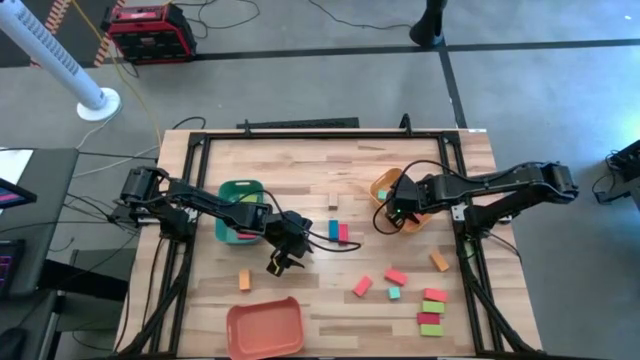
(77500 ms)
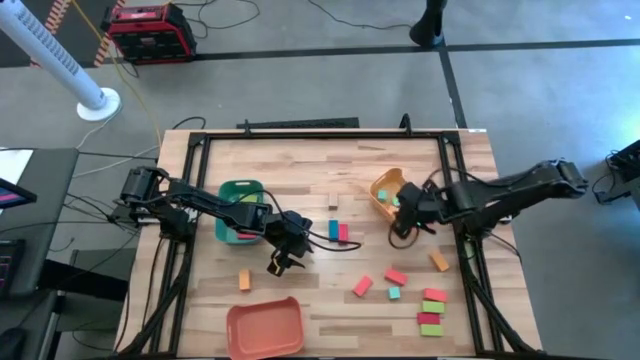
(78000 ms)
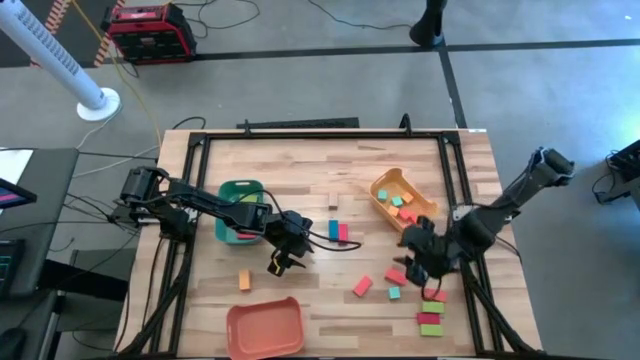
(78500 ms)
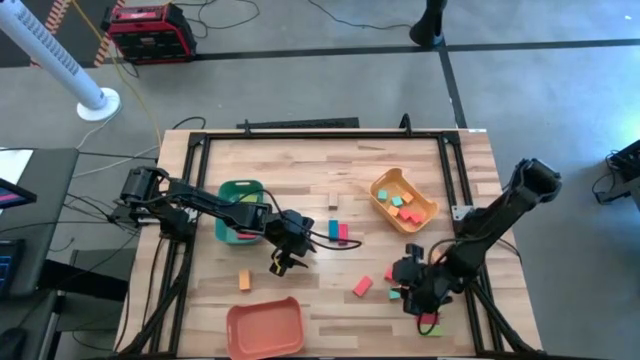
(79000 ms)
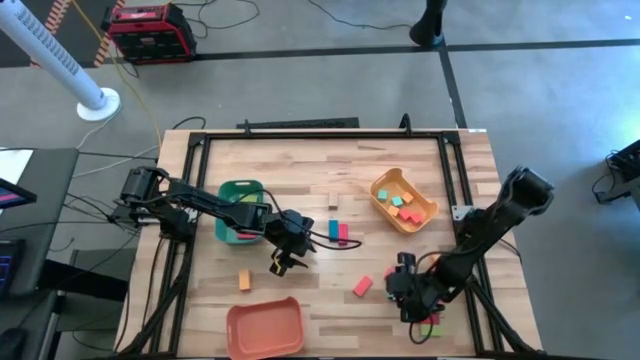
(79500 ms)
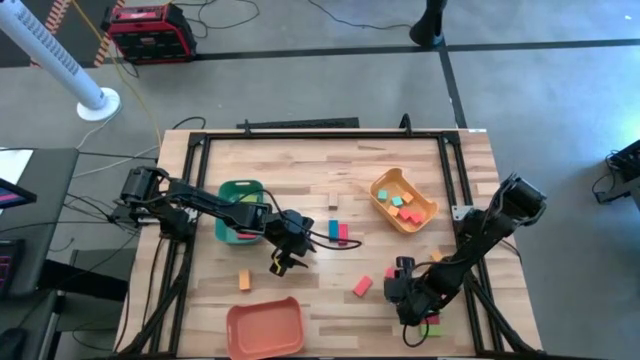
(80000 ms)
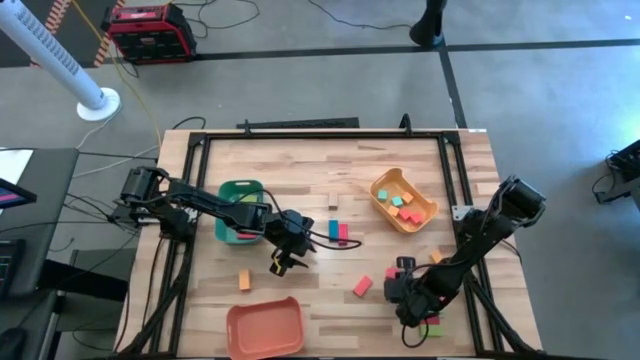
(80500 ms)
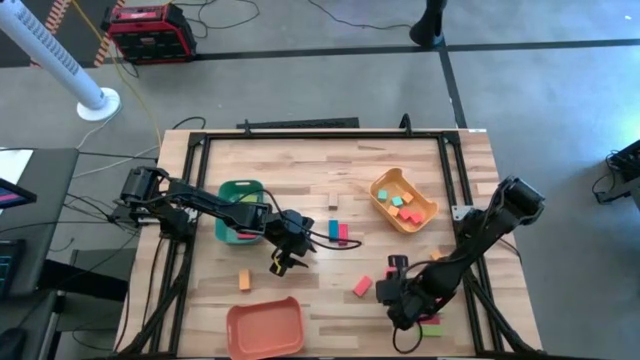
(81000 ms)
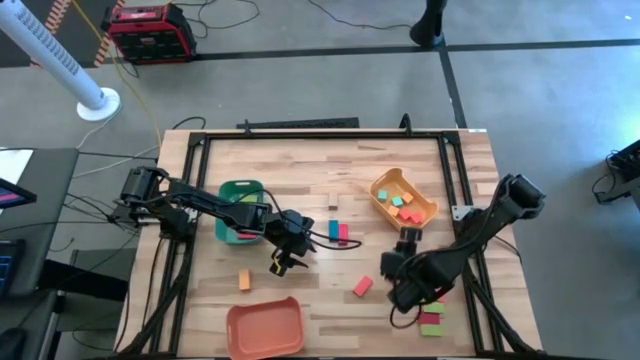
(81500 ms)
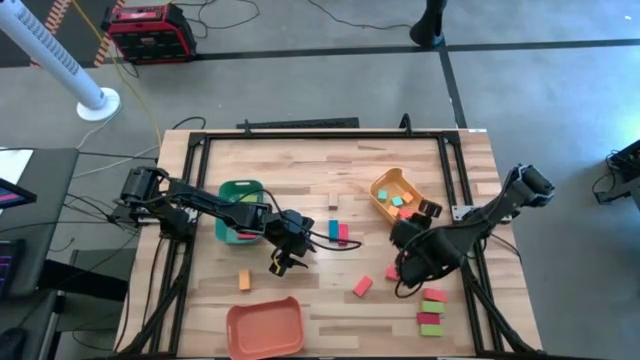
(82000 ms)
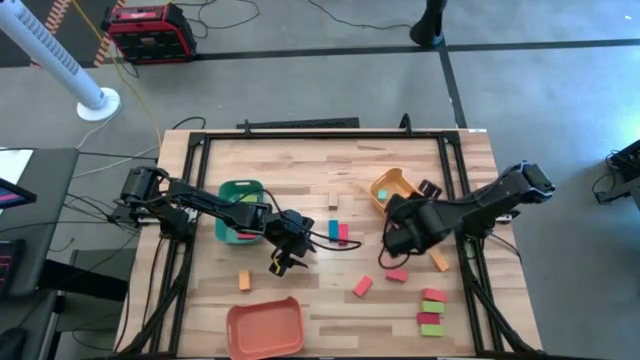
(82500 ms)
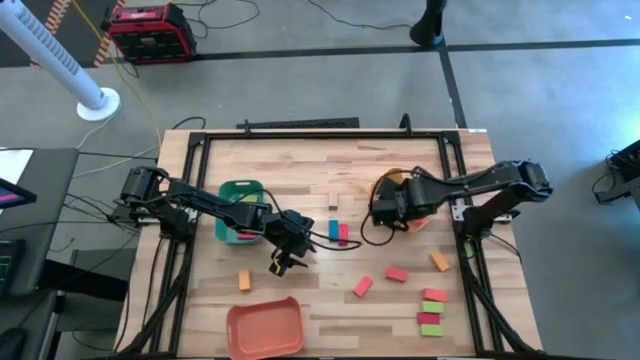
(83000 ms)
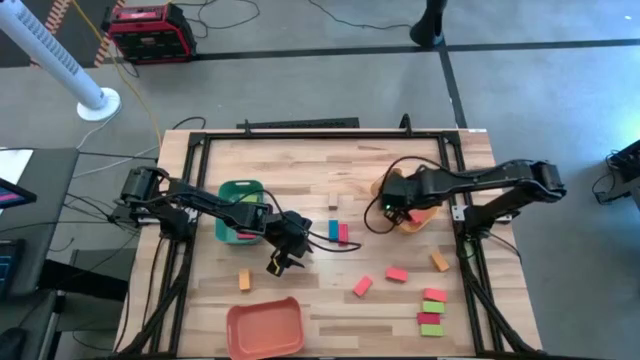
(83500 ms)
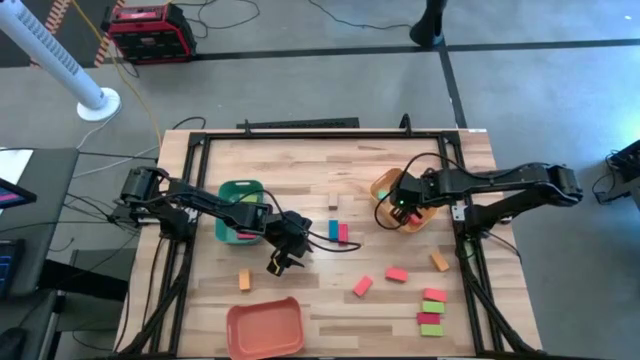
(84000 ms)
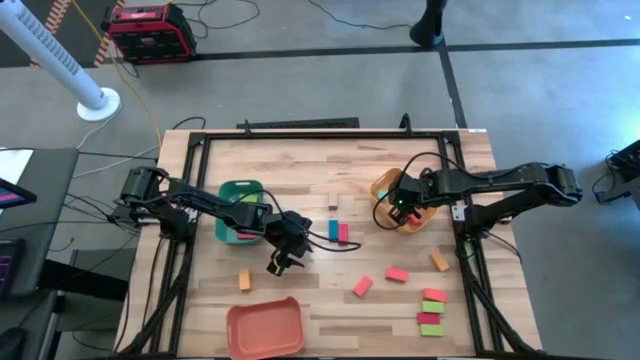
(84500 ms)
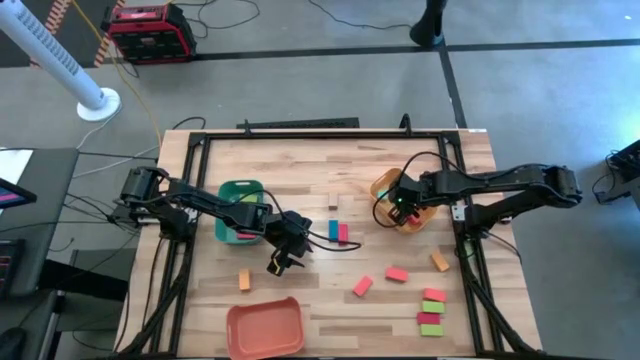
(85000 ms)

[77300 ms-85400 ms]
Task: Sort blocks by size
Put the light blue cube block into the yellow bin

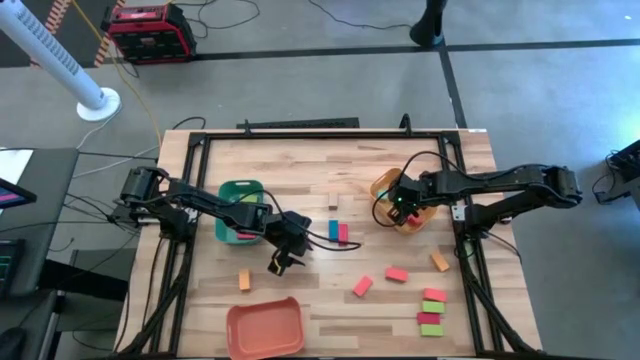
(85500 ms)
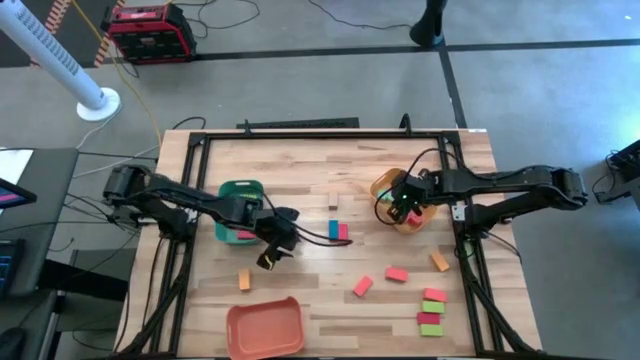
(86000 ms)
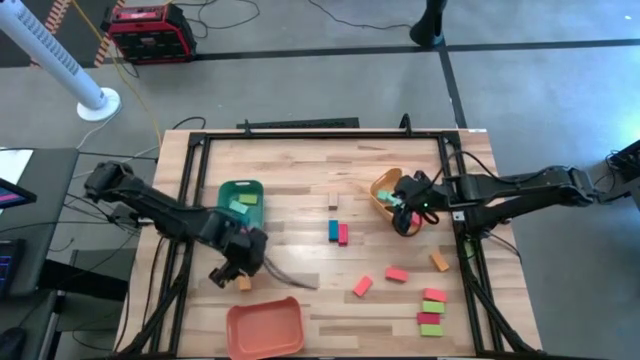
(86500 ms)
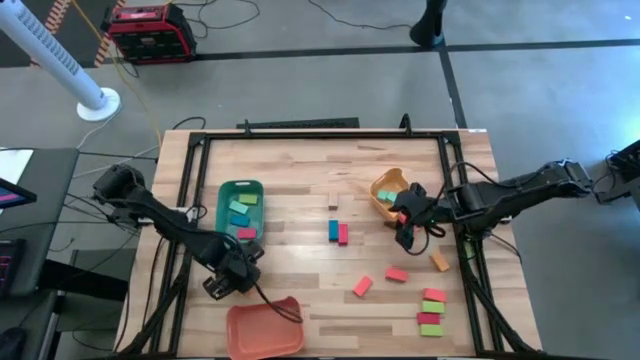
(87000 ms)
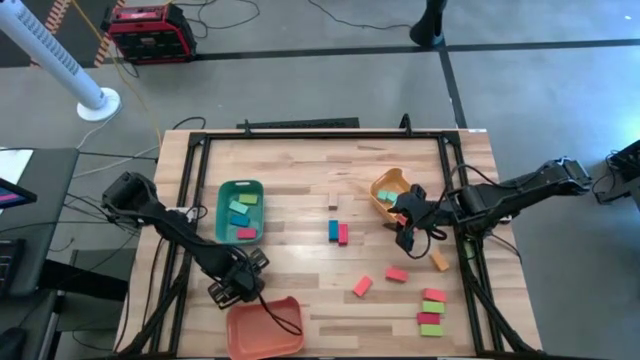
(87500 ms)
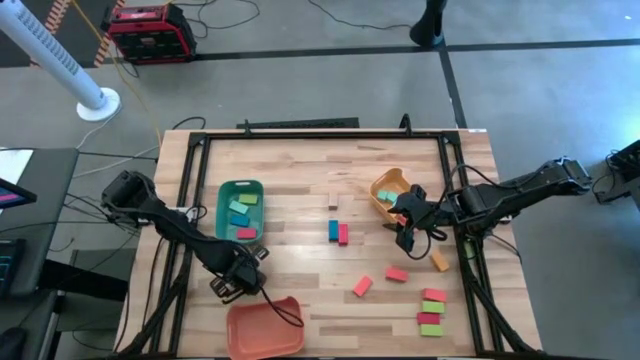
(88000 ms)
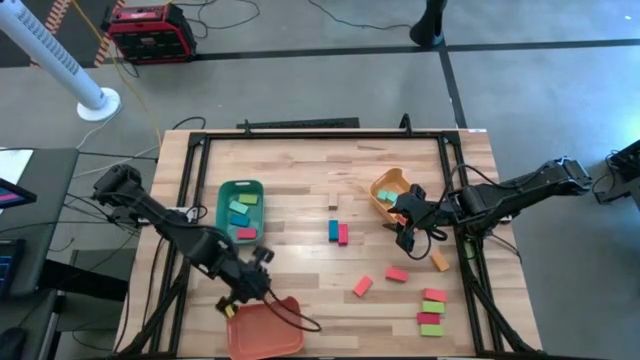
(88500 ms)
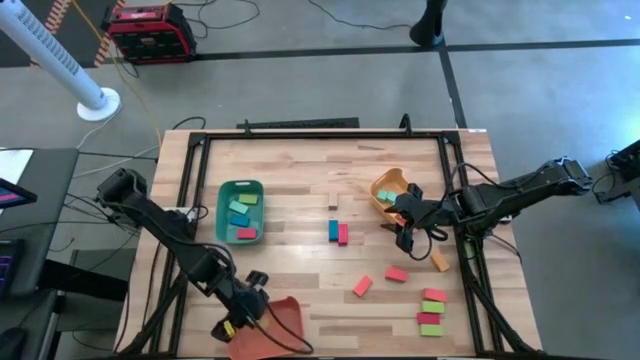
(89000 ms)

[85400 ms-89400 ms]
Put the thick yellow rectangular block into the orange bin

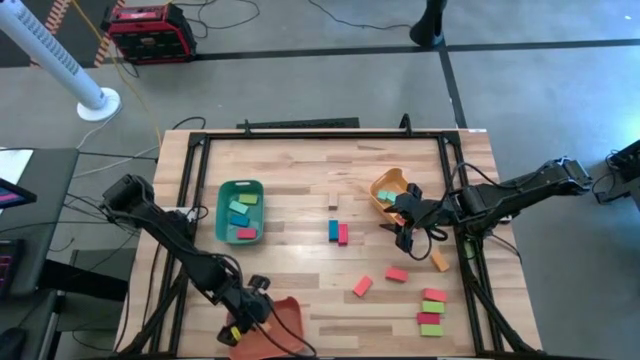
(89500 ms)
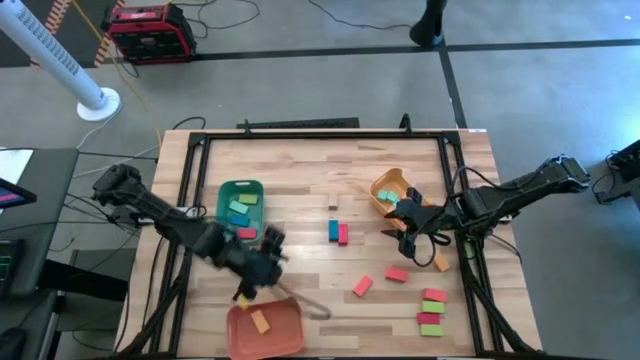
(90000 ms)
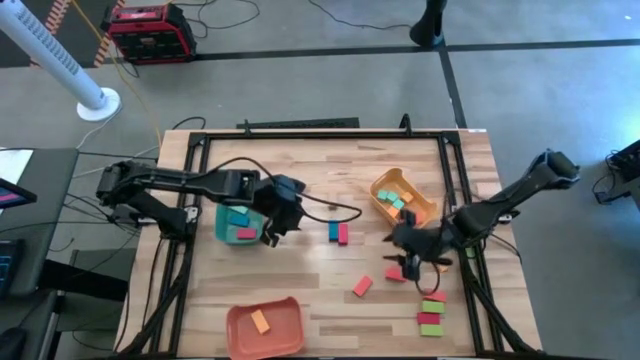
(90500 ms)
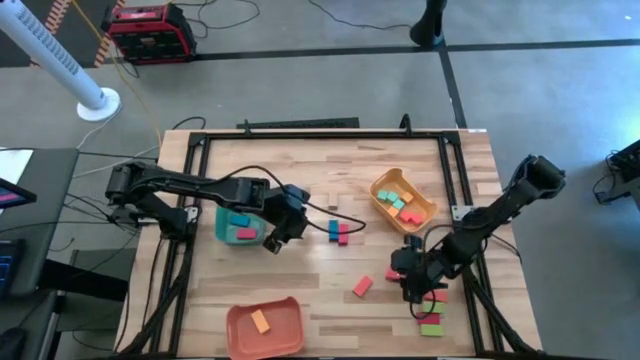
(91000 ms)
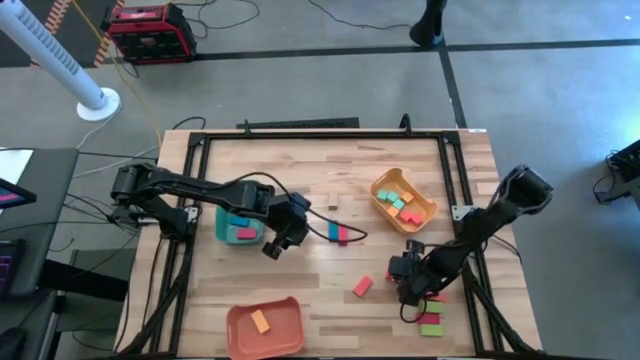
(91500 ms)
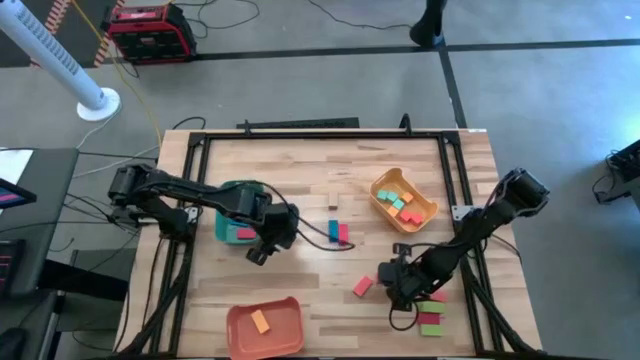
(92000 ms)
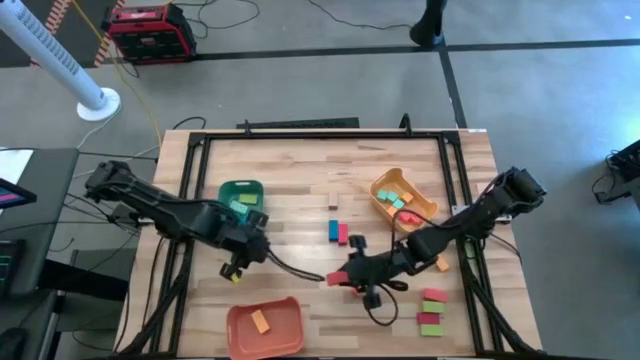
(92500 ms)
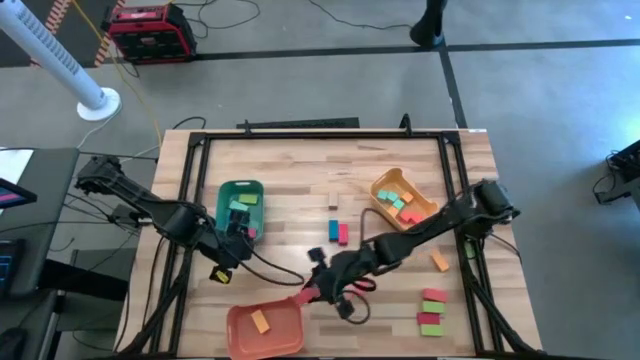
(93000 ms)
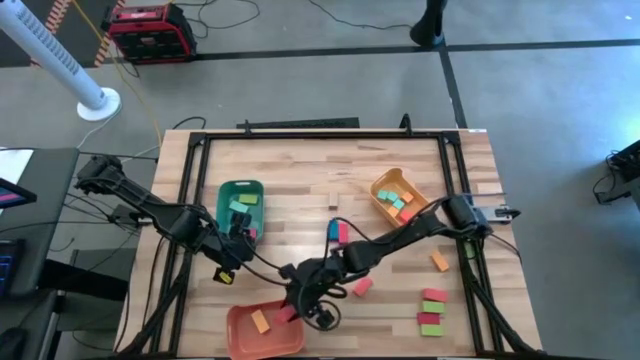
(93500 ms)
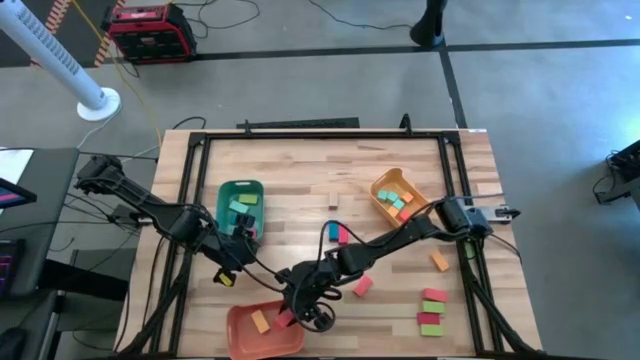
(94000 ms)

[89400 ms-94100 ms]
Put the thick top orange rectangular block into the orange bin

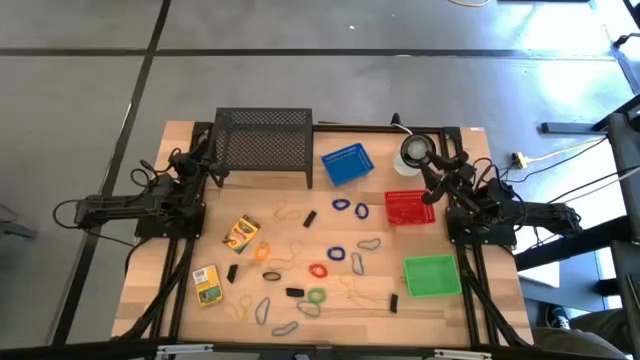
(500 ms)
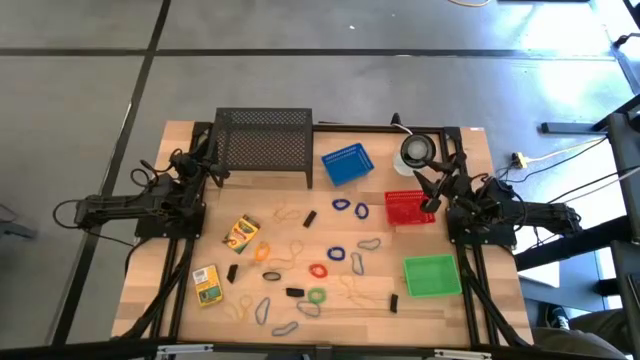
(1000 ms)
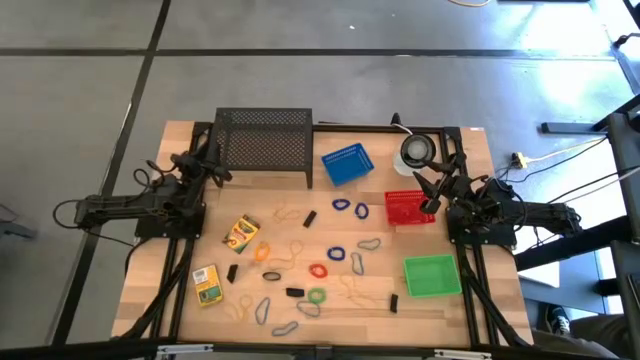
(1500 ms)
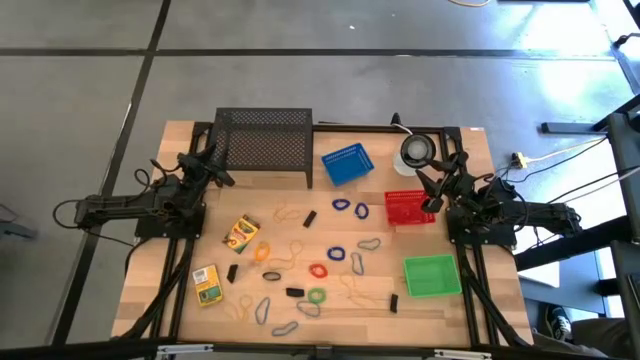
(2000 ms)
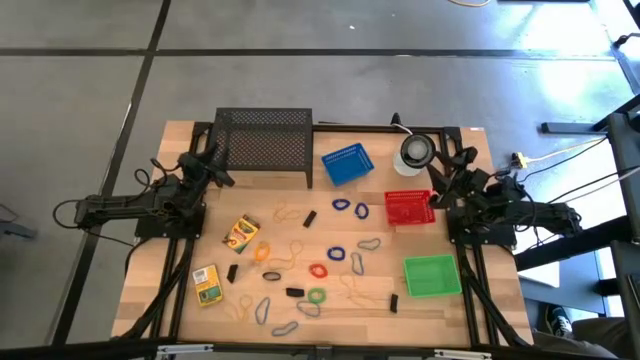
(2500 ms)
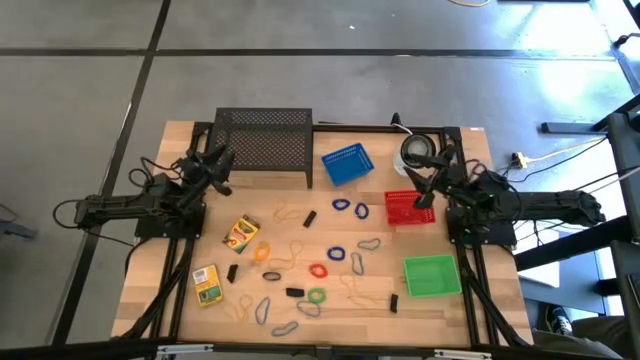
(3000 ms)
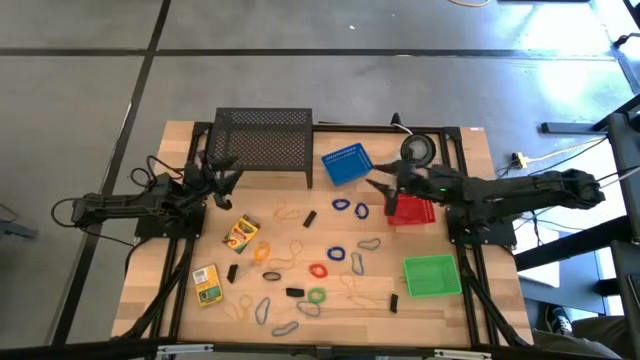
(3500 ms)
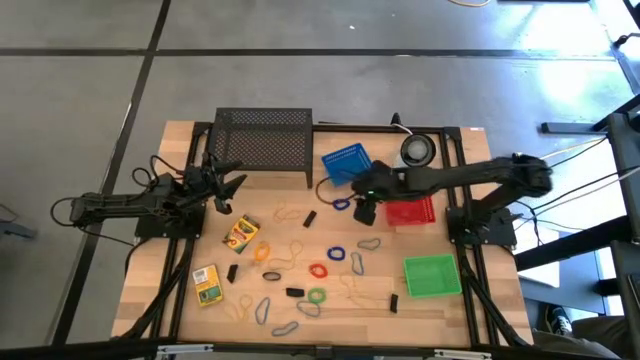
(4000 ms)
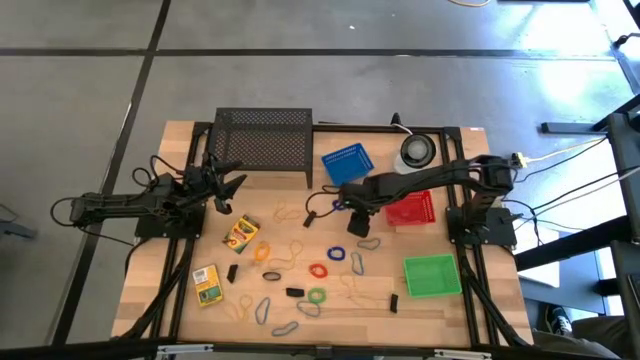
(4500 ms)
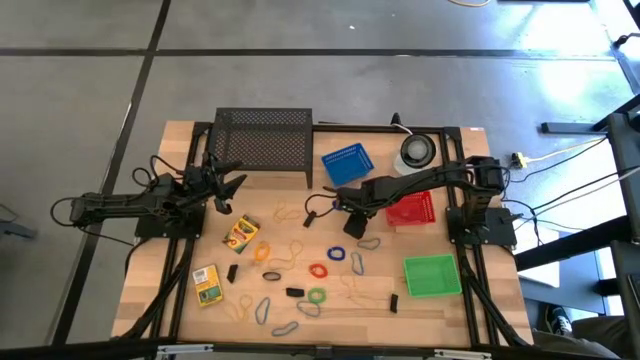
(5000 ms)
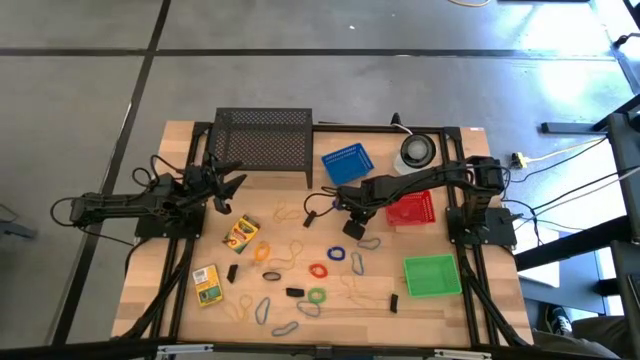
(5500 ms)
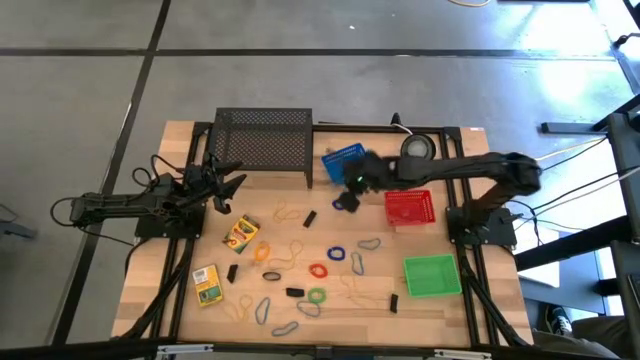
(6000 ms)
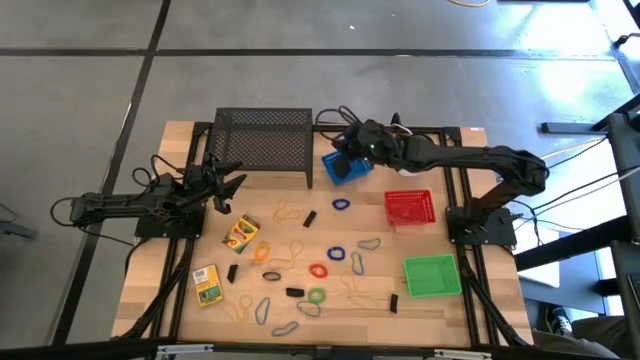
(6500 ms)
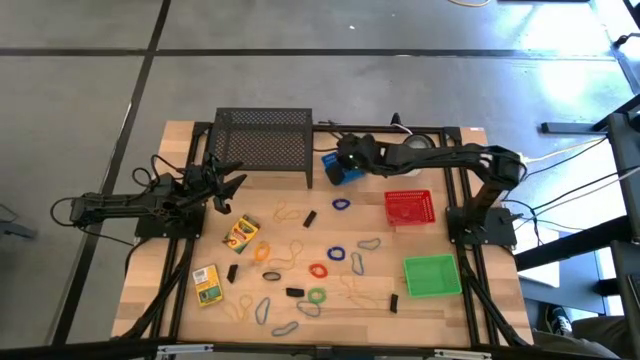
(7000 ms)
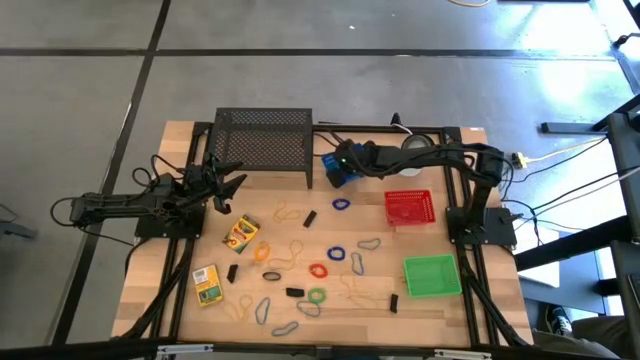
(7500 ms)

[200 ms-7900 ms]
Task: Pick & Place Office Desk Supplies
Put the blue wrist coil into the blue bin
